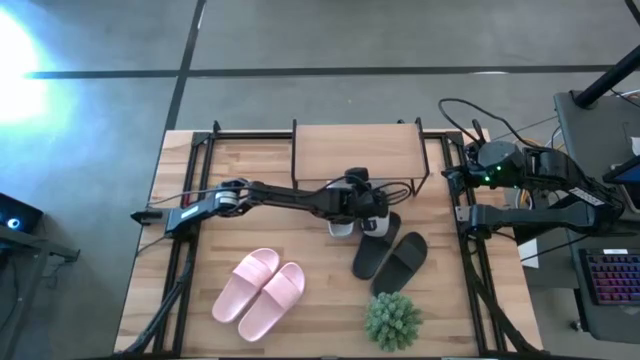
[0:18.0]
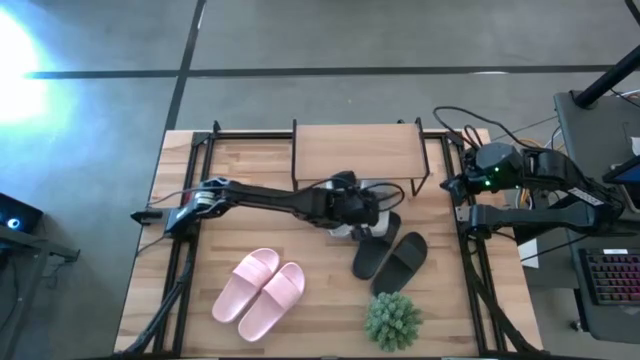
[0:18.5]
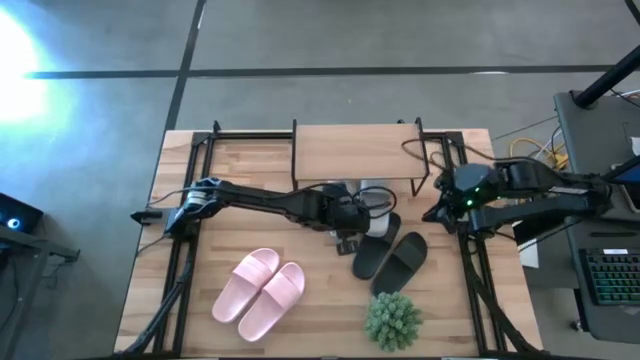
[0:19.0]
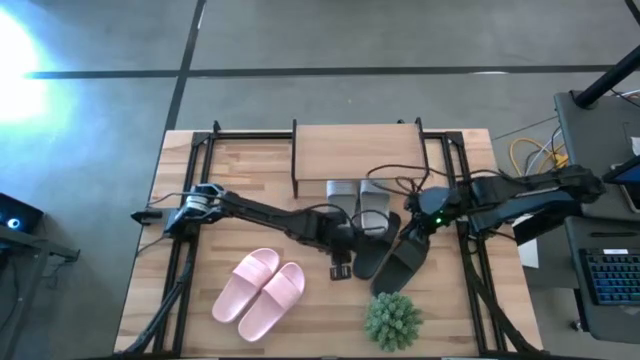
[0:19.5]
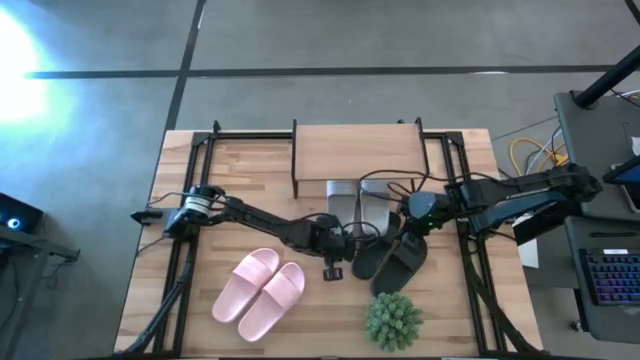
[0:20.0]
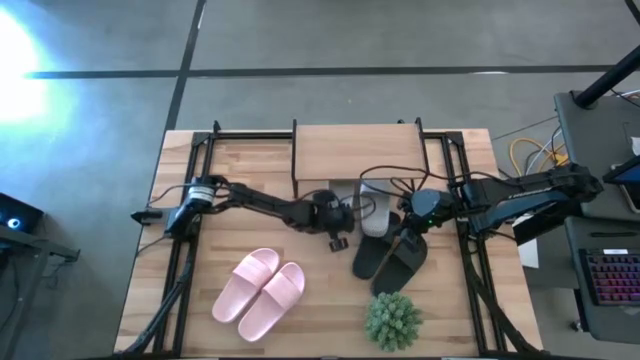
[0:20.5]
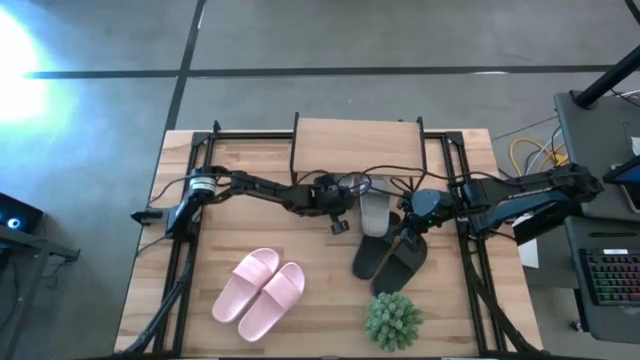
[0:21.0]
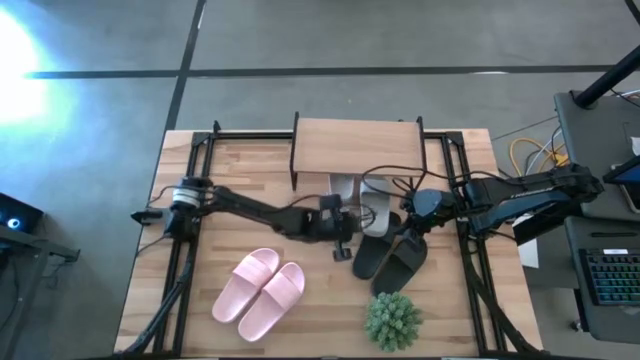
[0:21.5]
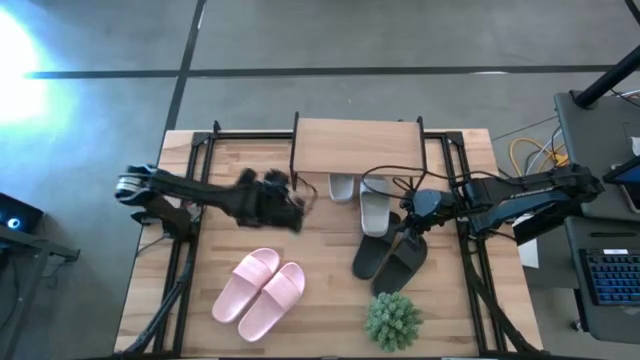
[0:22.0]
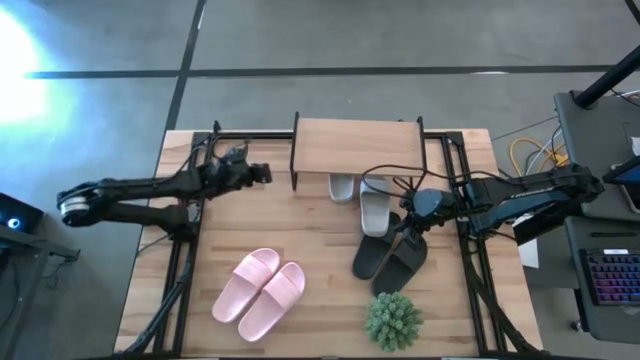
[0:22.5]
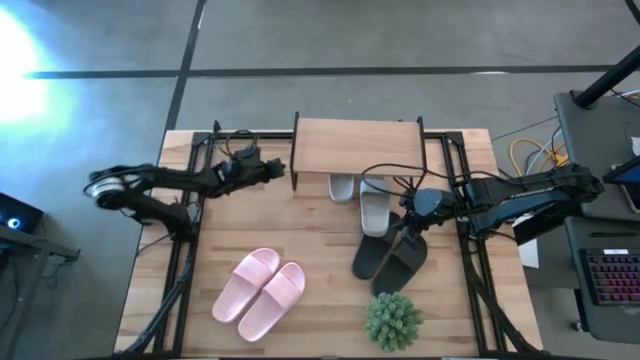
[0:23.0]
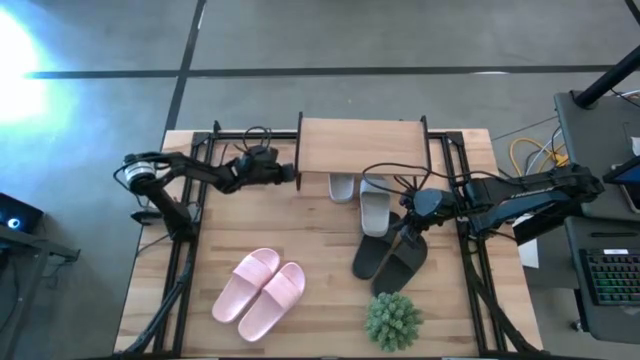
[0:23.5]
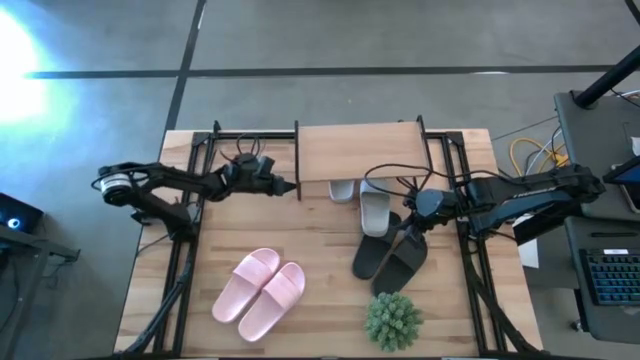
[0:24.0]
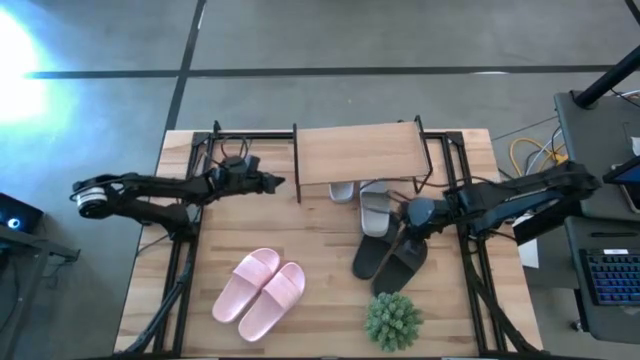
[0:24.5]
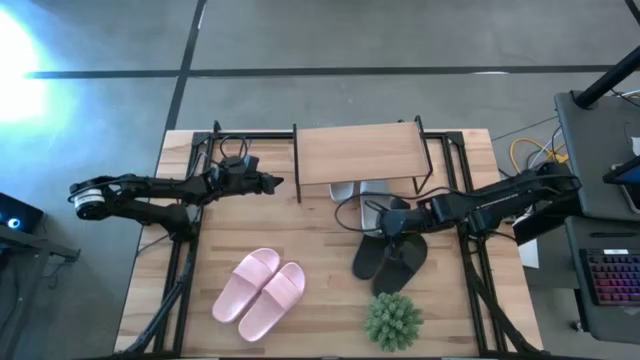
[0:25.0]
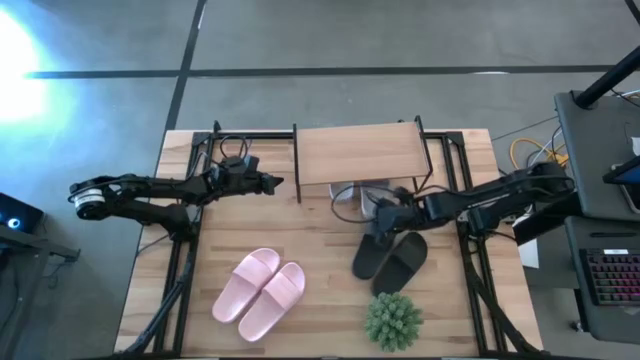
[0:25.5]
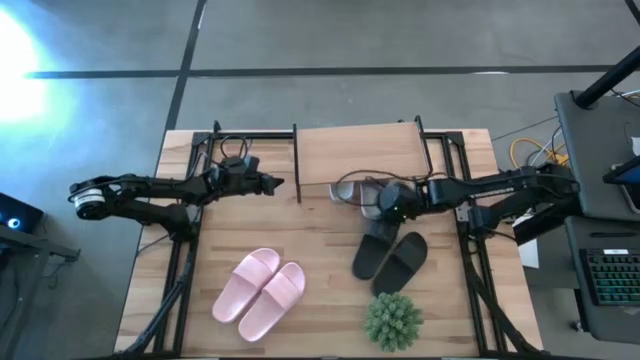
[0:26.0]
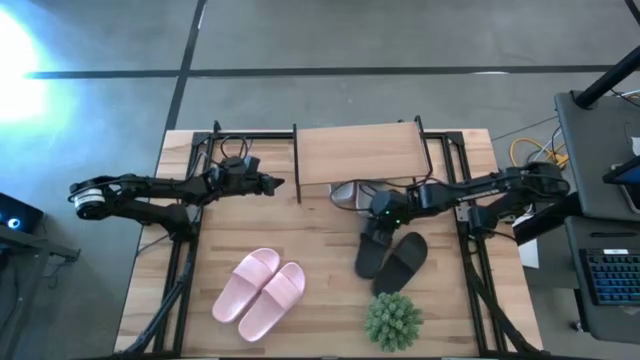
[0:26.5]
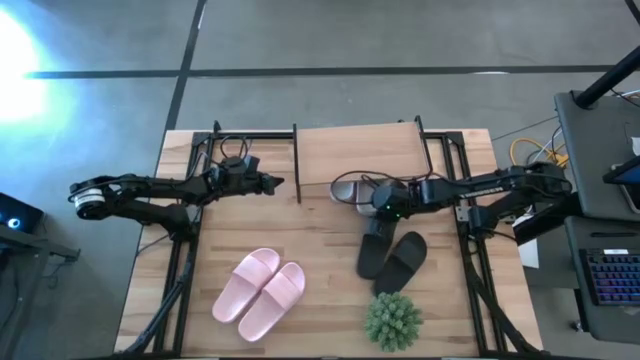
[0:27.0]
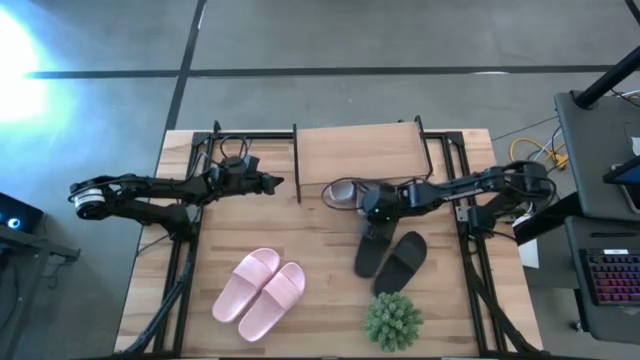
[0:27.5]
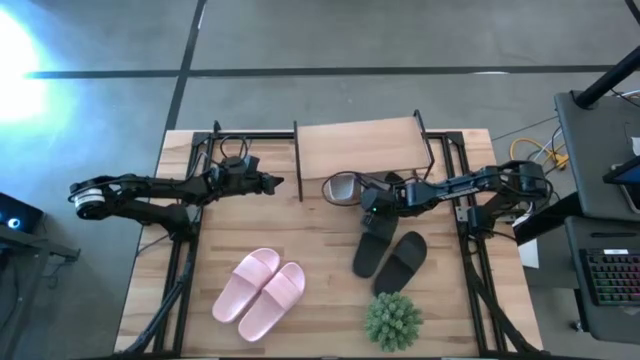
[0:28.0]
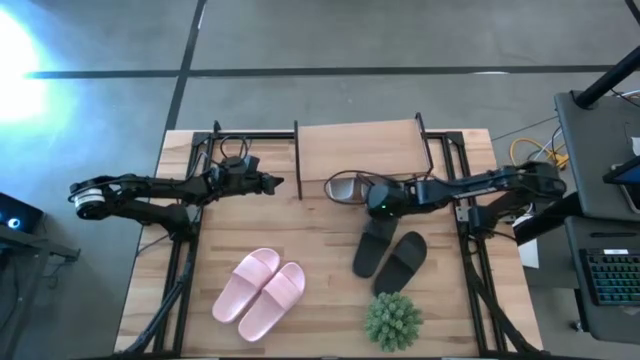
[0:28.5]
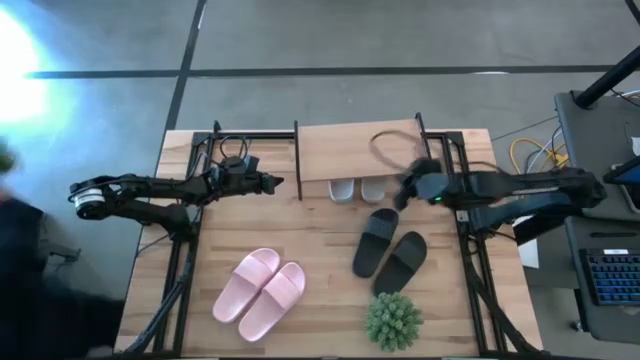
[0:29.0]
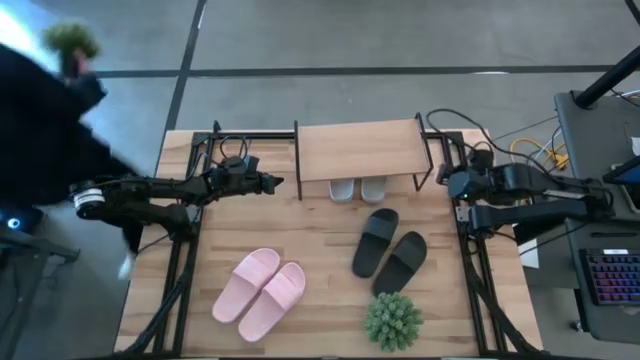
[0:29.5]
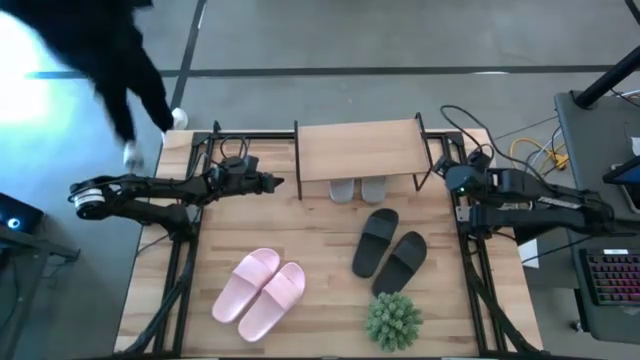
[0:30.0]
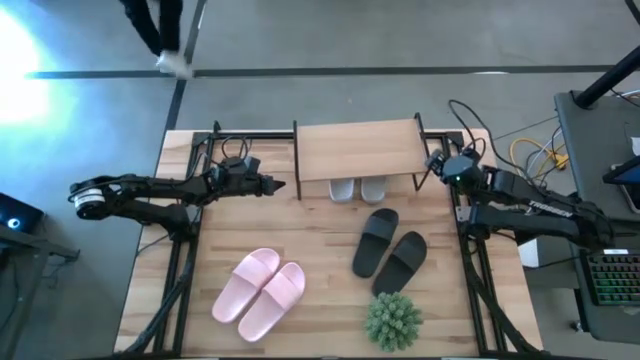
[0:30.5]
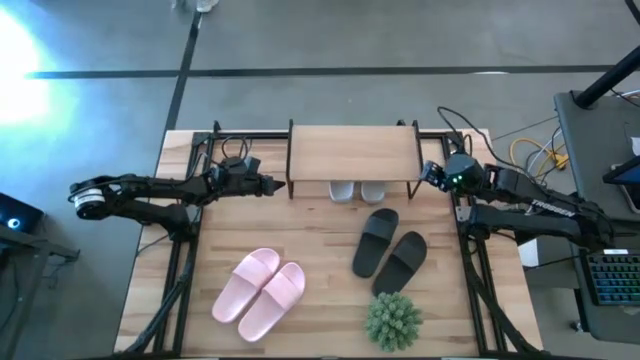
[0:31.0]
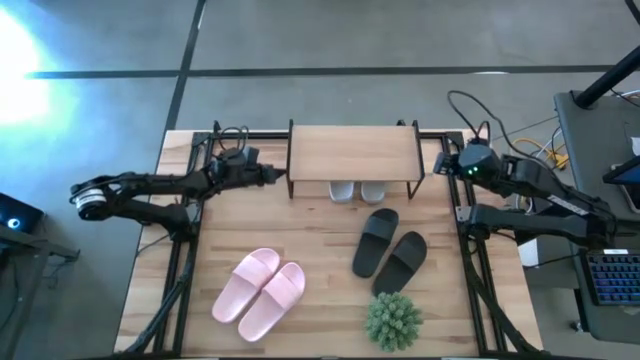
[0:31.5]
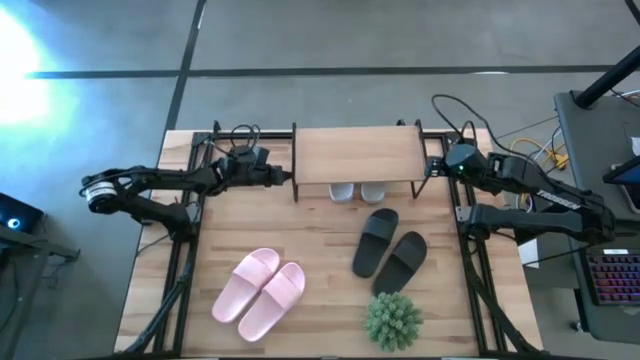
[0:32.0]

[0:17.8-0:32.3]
Task: Pick and place slides into the shelf
Adjust the shelf and adjust the gray slippers on the table

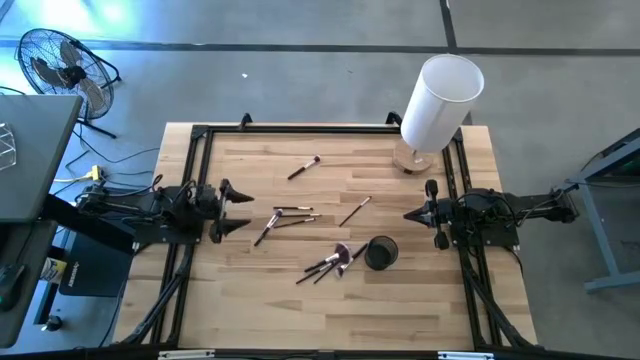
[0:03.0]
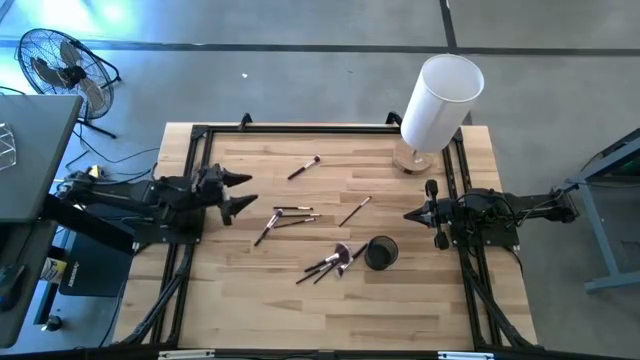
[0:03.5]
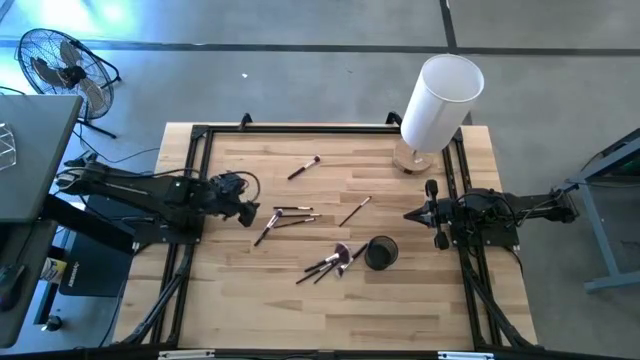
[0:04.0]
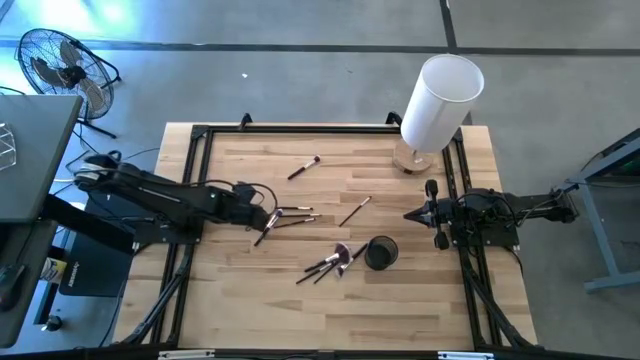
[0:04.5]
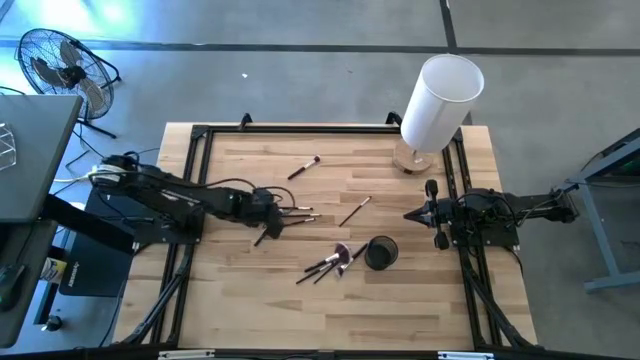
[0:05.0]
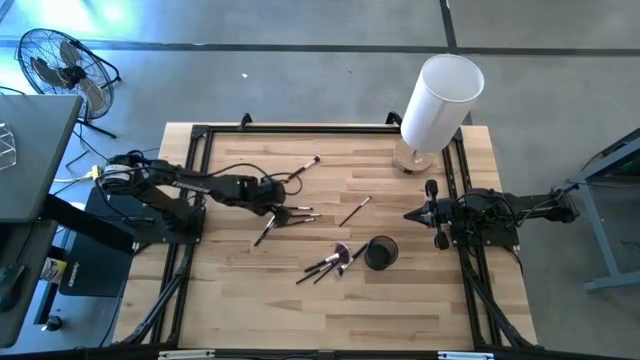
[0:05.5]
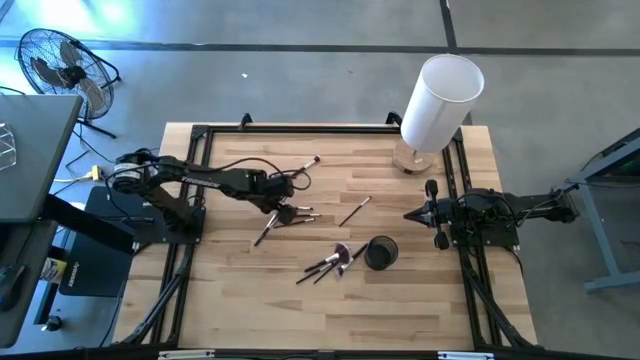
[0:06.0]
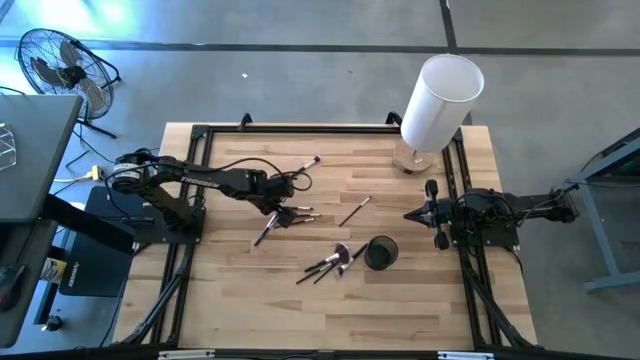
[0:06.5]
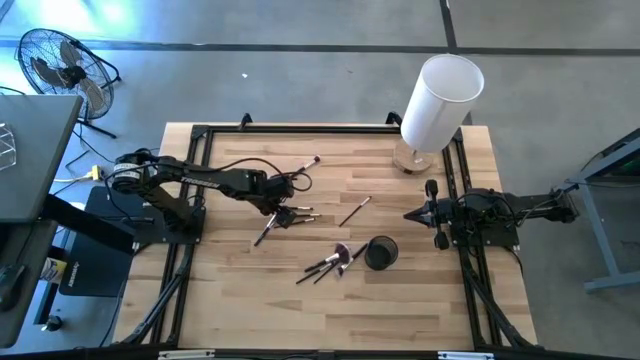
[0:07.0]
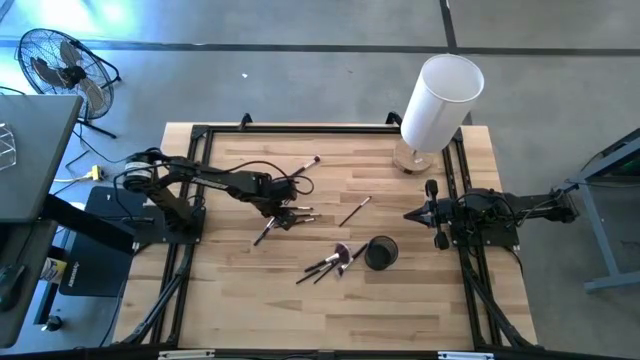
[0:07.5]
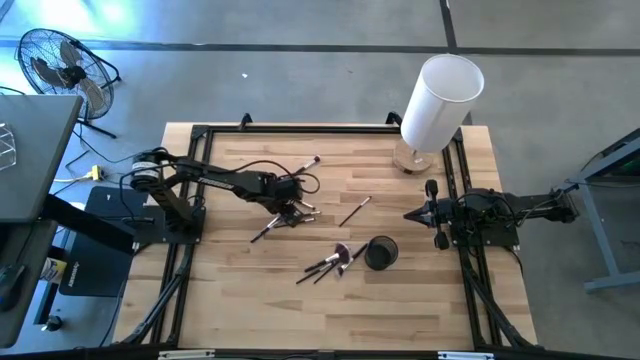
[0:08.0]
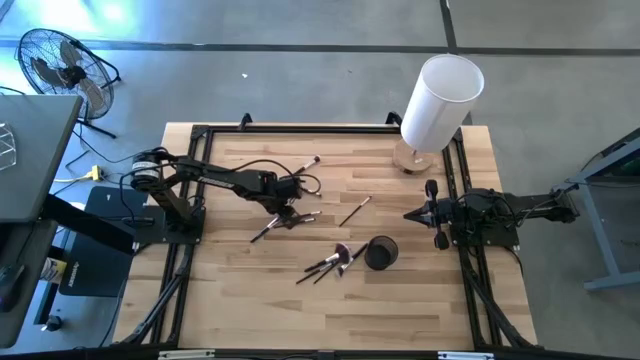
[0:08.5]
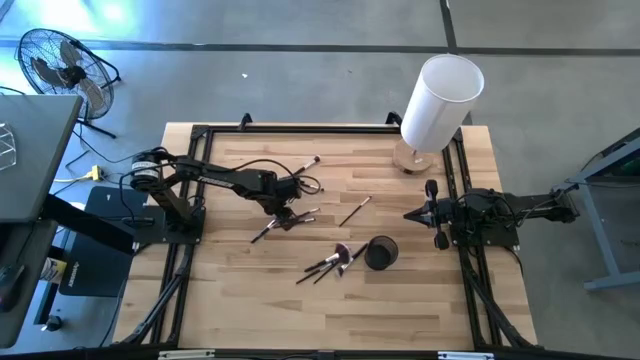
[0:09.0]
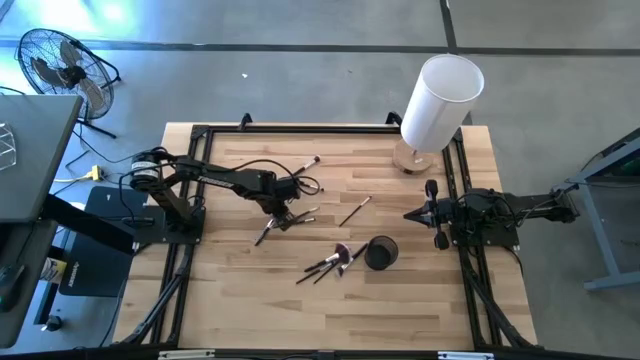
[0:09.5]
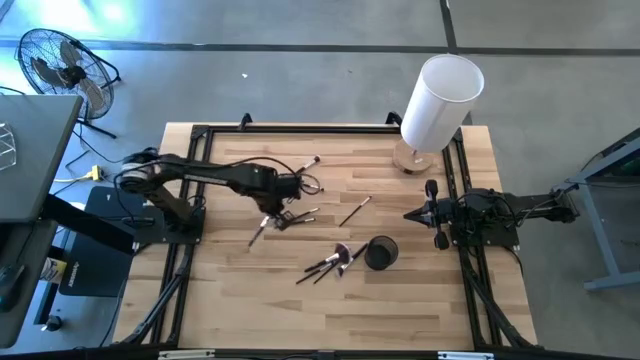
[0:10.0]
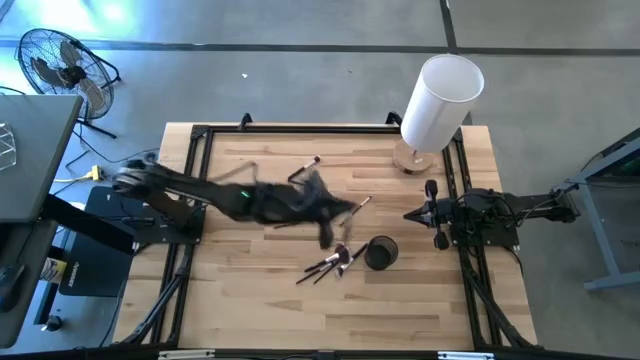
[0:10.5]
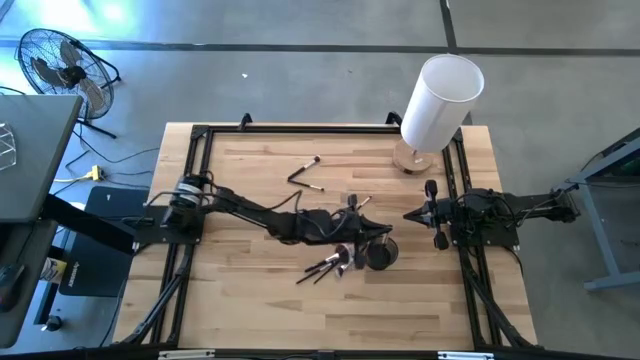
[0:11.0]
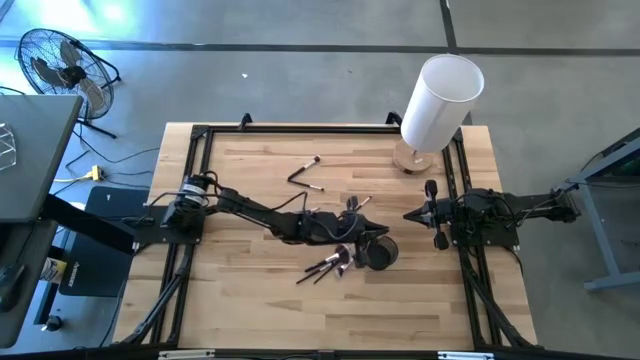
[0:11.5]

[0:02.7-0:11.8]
Task: Put items in baskets/containers
Put the bottom blush brush into the mesh organizer
